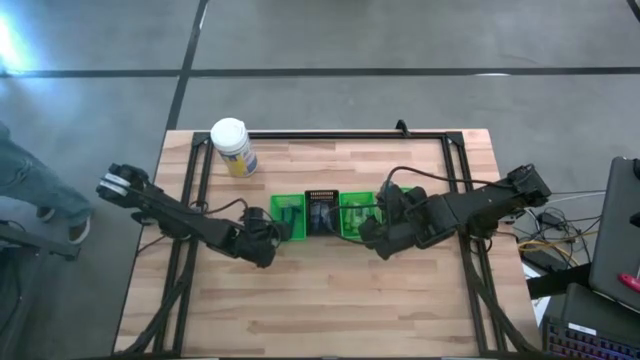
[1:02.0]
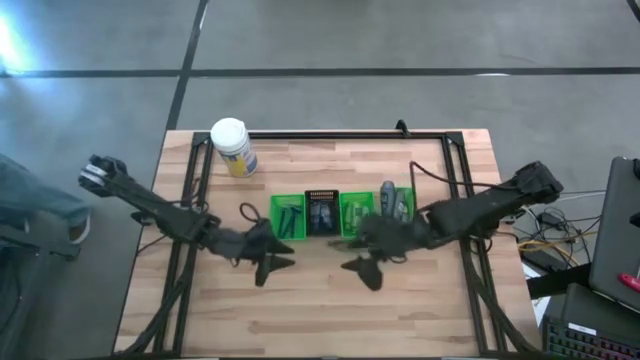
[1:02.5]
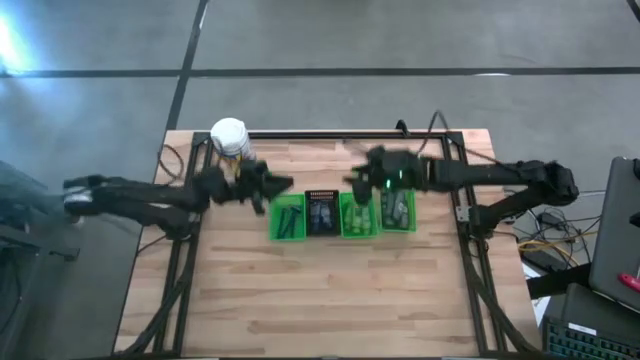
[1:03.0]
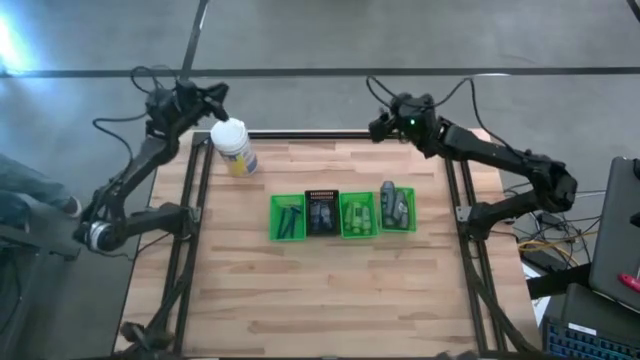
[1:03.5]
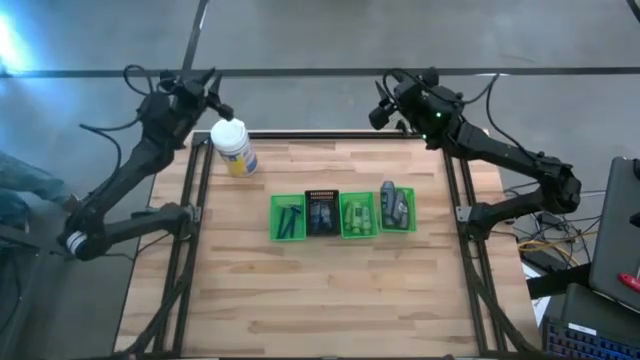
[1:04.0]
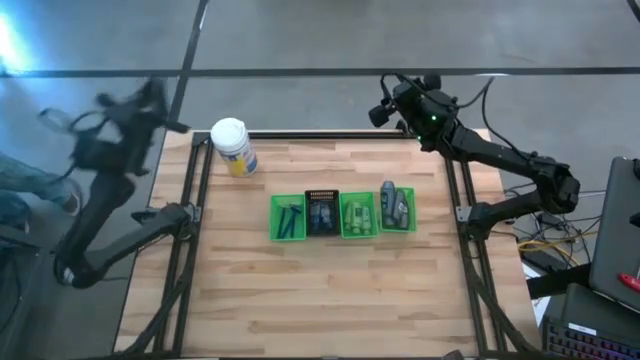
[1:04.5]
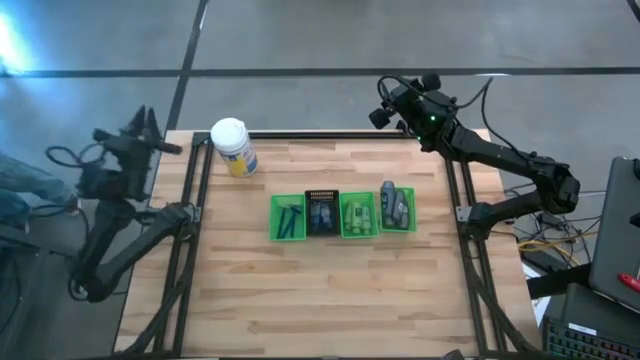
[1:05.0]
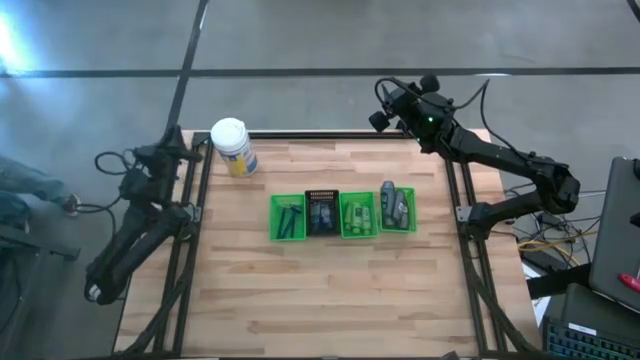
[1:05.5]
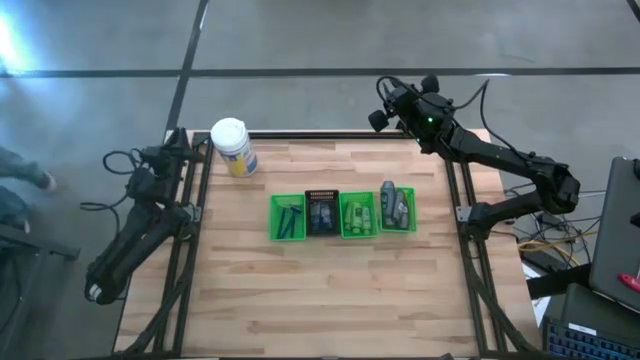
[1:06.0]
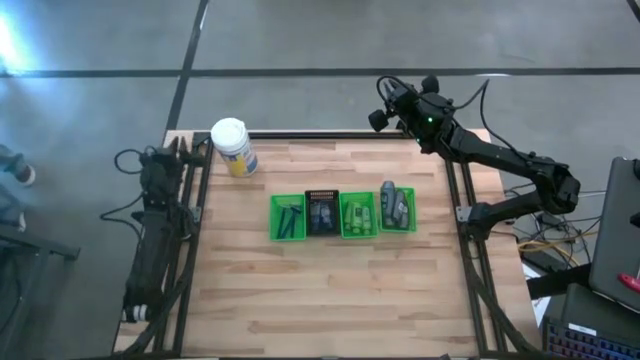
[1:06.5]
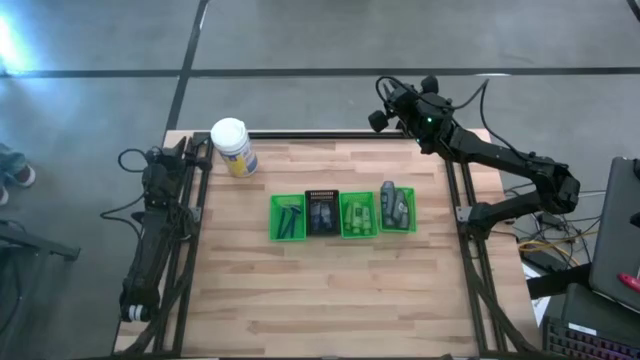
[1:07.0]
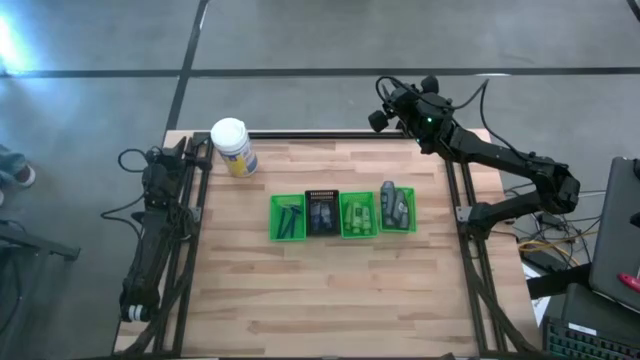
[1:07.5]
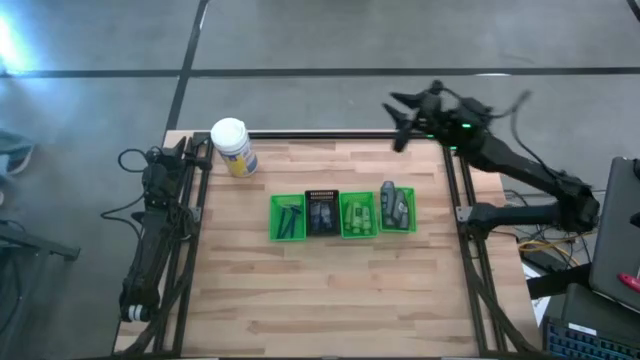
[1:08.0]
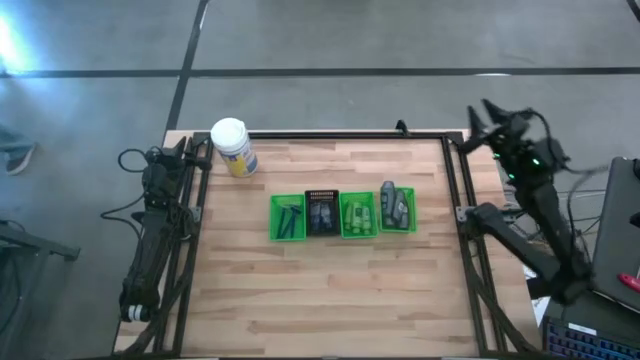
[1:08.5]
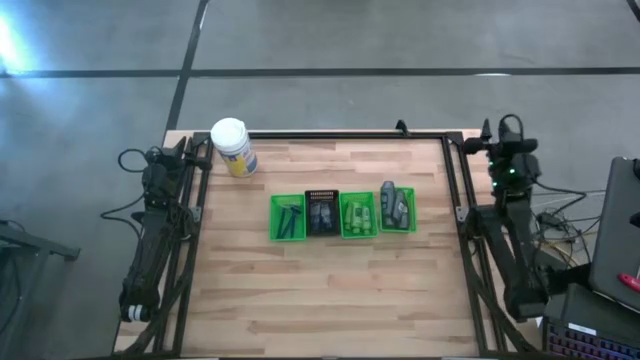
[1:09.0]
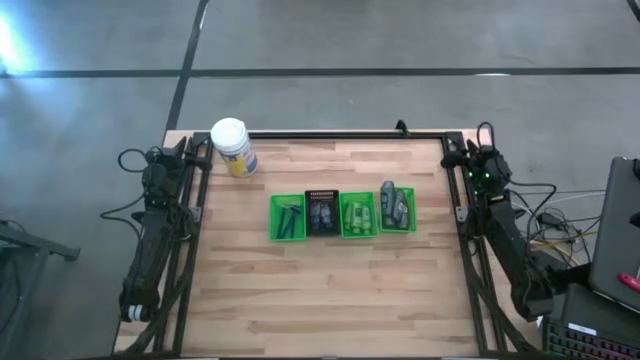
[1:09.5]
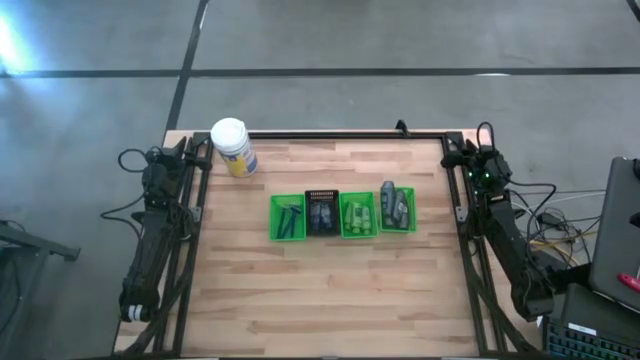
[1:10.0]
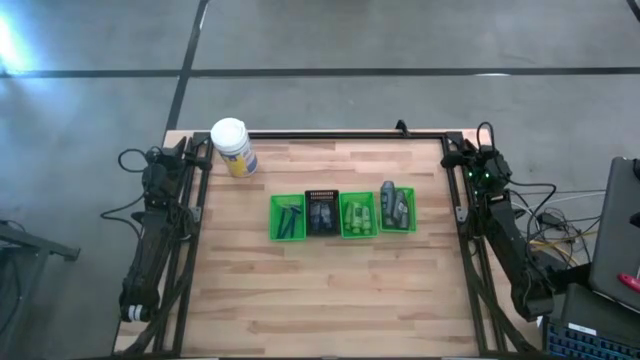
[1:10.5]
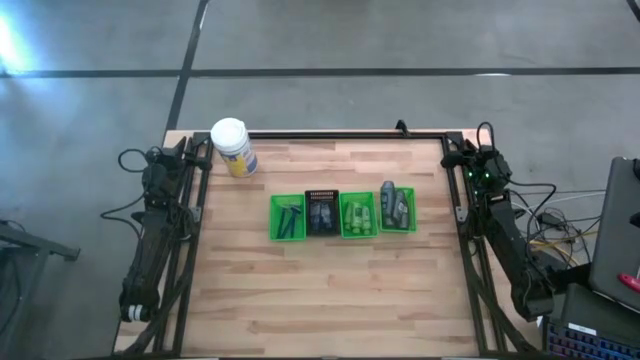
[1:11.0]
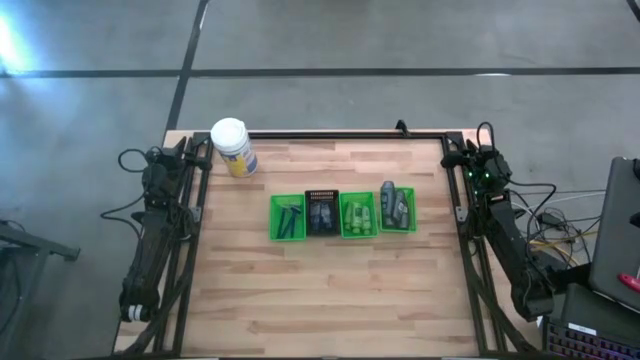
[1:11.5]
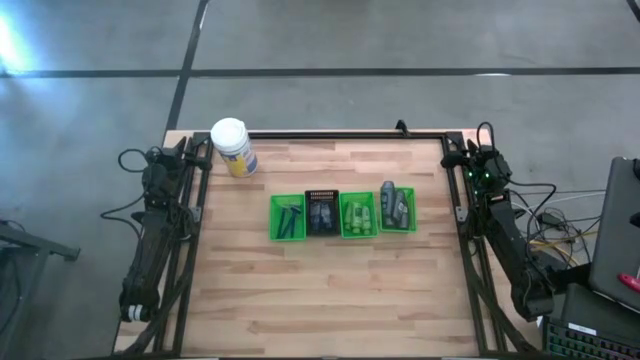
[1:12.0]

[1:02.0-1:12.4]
Task: Pick & Place Travel size toiletries
Return to Home Position

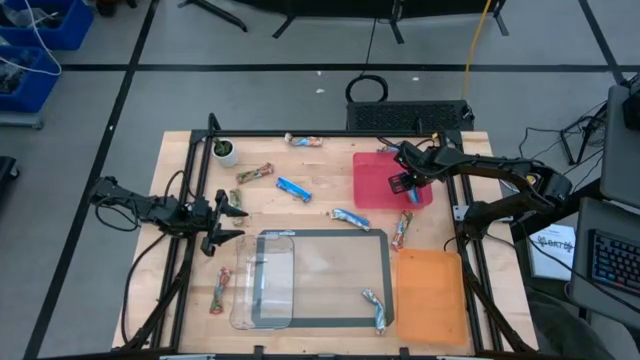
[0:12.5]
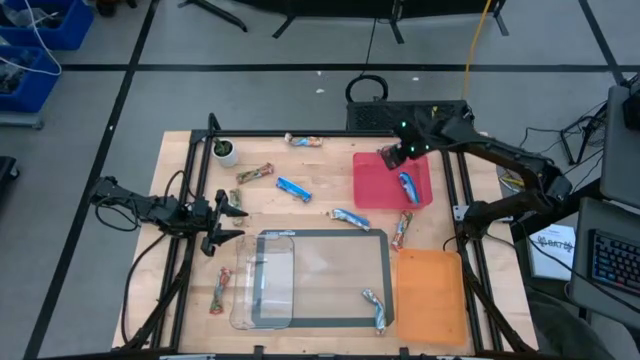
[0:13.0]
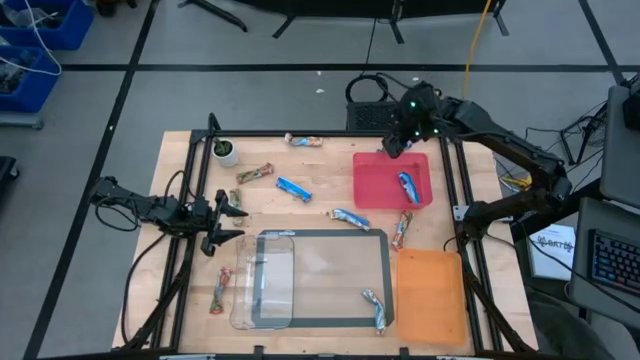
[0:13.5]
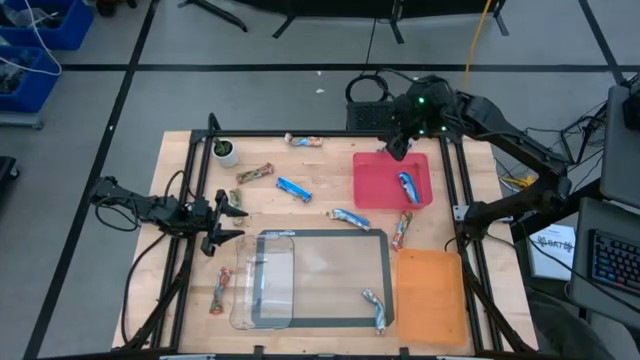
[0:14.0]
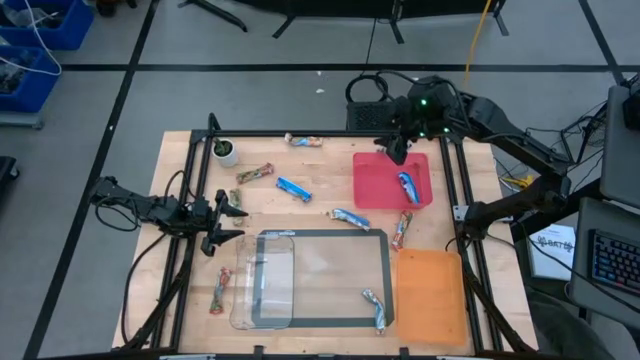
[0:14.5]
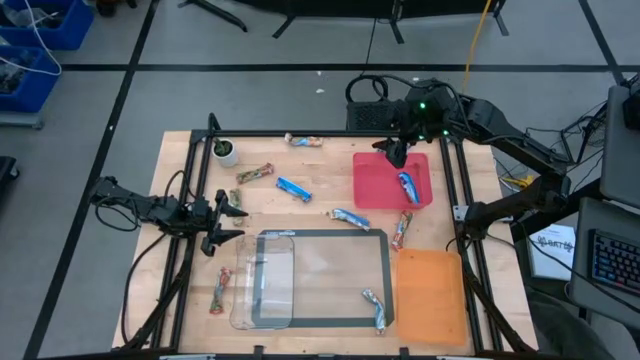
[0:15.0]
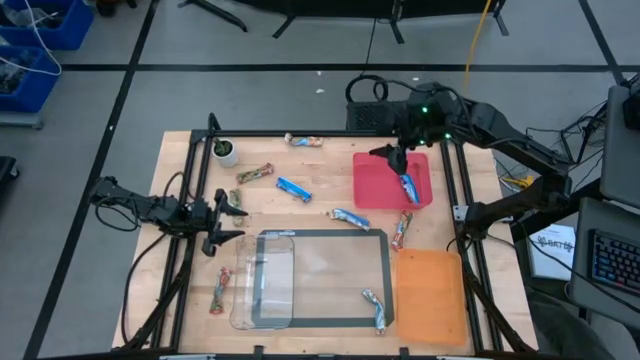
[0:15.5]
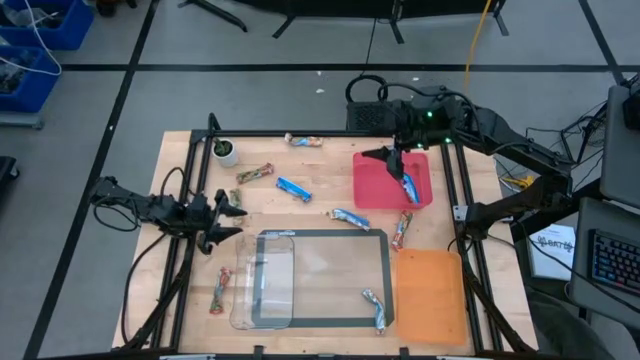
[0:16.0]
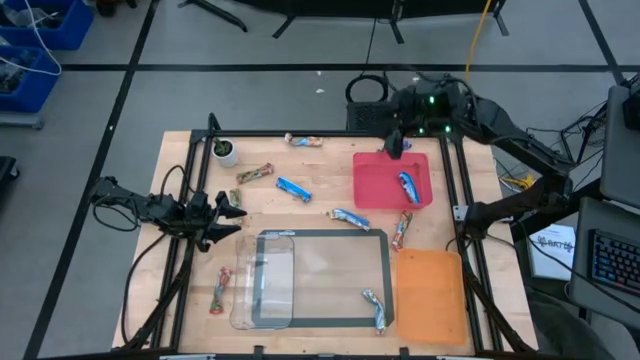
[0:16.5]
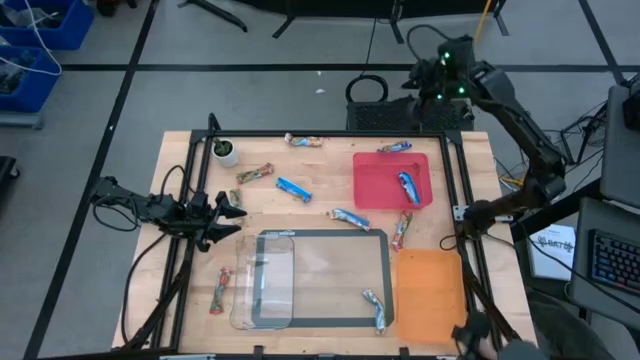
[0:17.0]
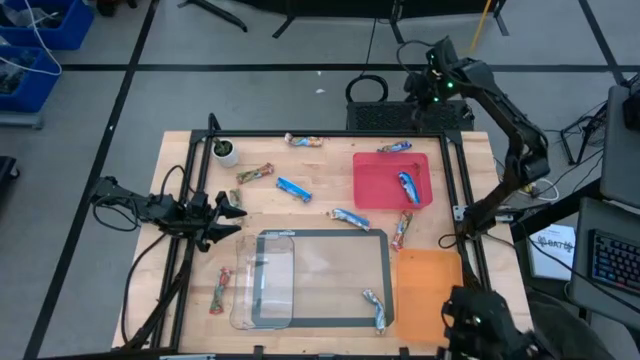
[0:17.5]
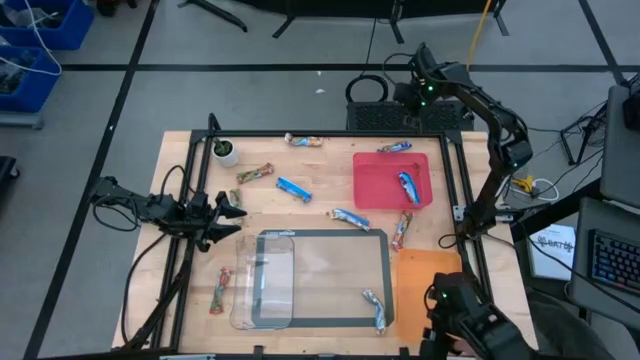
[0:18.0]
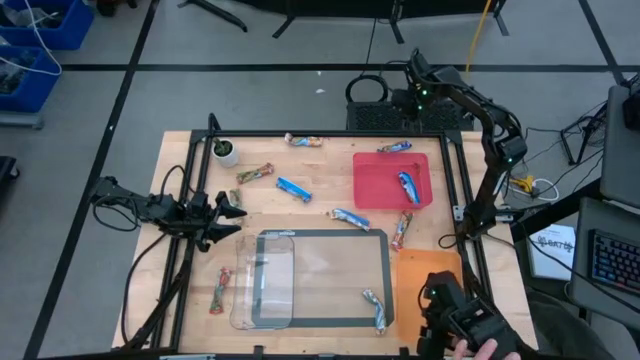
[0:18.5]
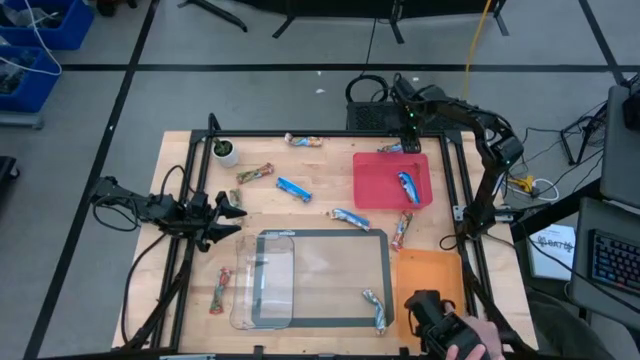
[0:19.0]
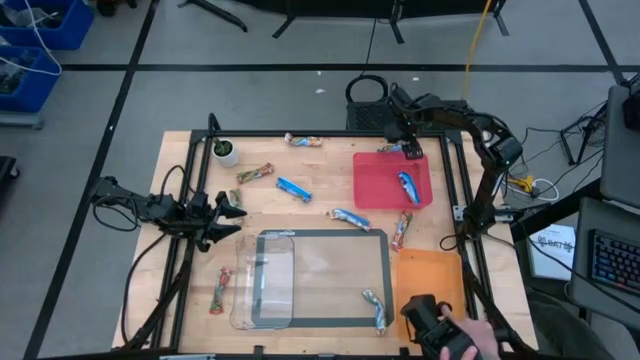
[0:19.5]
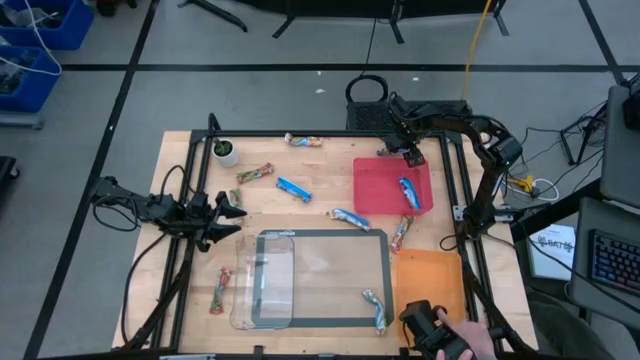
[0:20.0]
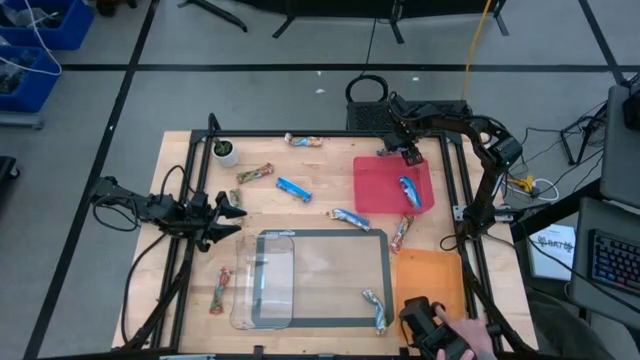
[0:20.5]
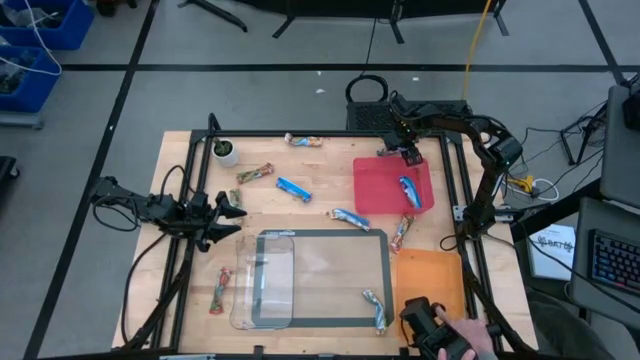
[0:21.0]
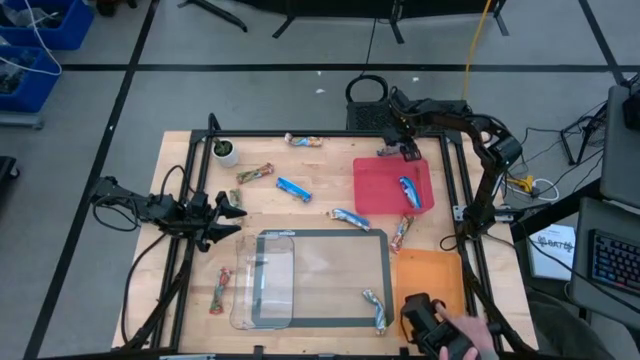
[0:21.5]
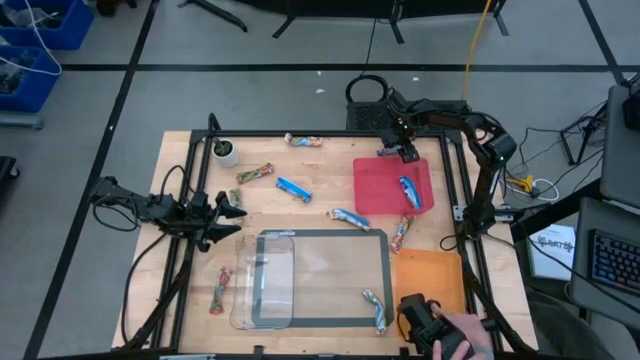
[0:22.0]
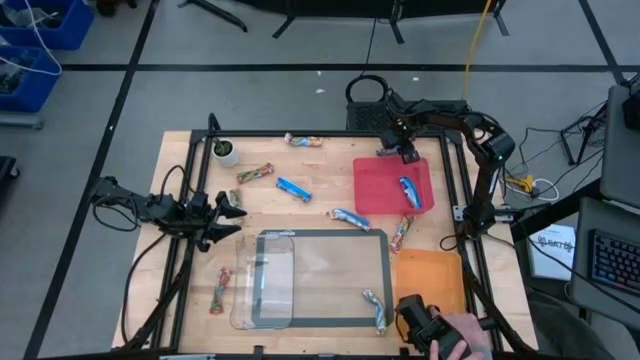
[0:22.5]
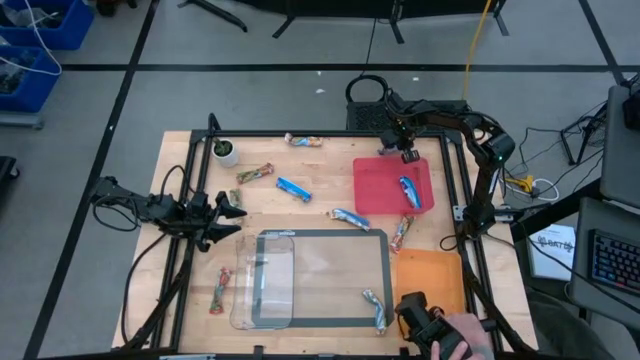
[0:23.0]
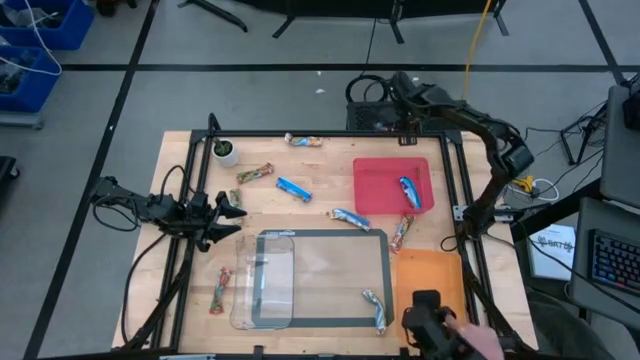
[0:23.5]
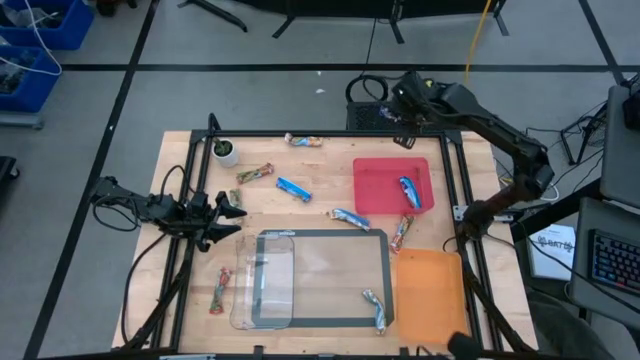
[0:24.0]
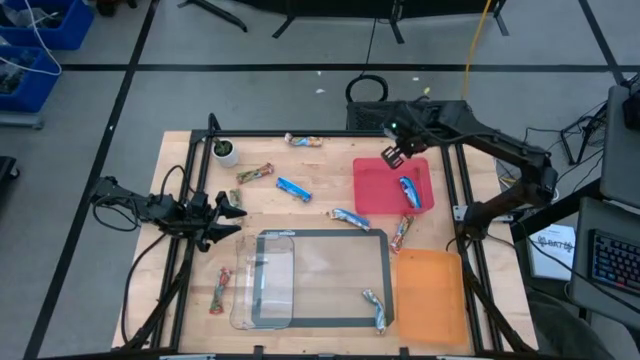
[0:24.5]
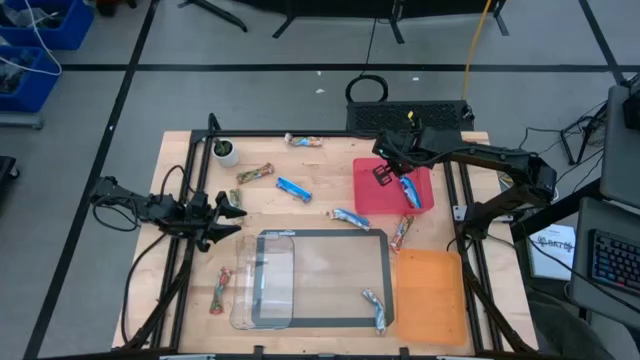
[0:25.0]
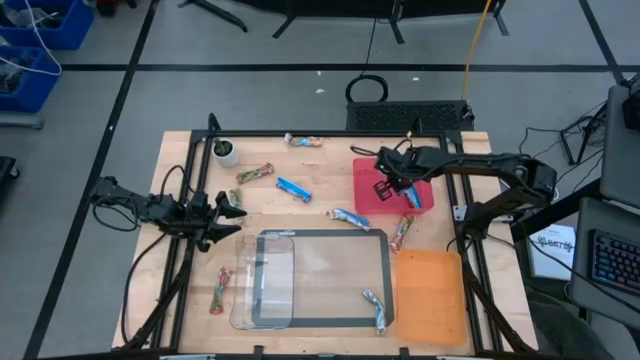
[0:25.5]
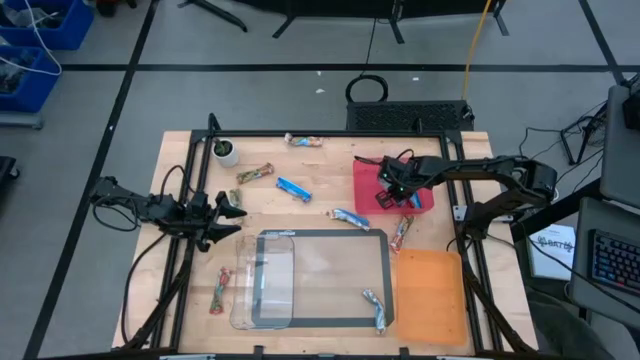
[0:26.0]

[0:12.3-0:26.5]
Task: Pick and place Granola Bars by type
Put the top blue granola bar into the red bin
